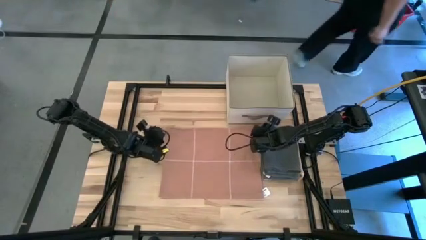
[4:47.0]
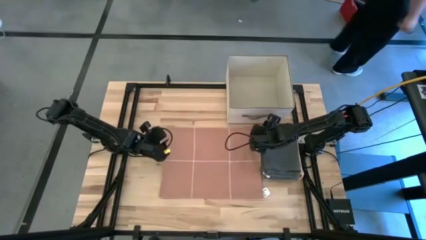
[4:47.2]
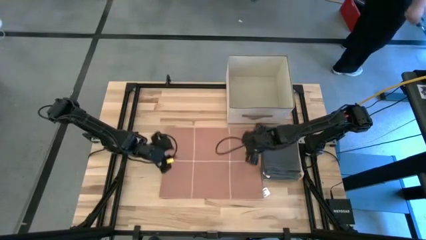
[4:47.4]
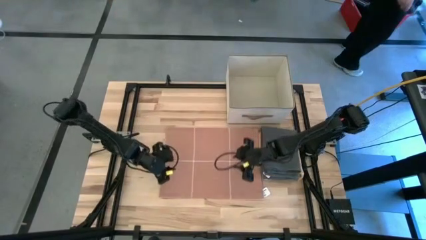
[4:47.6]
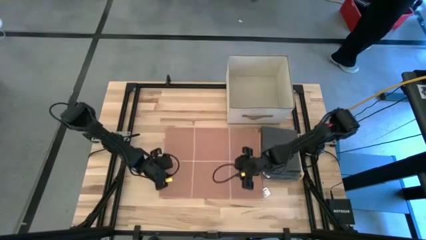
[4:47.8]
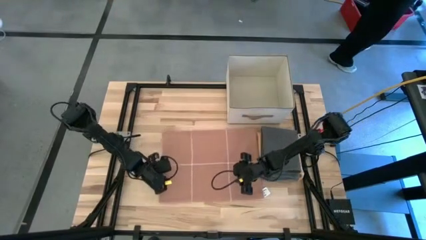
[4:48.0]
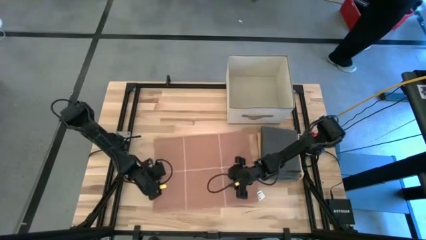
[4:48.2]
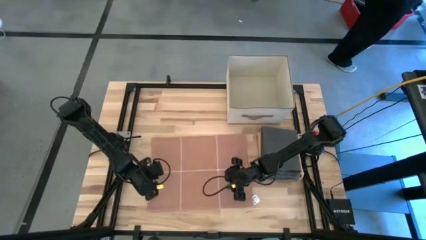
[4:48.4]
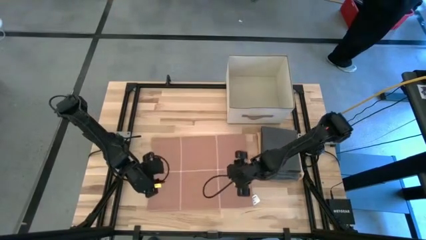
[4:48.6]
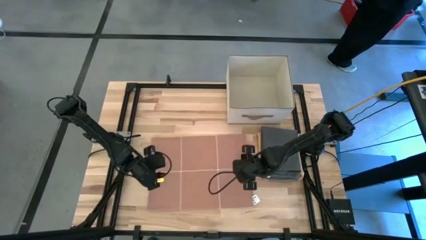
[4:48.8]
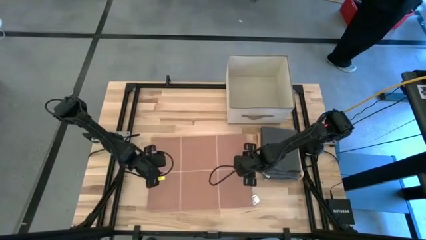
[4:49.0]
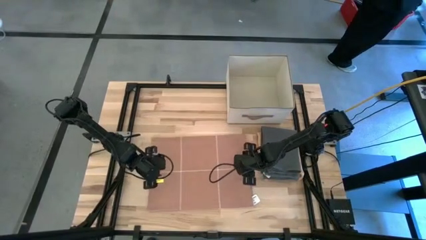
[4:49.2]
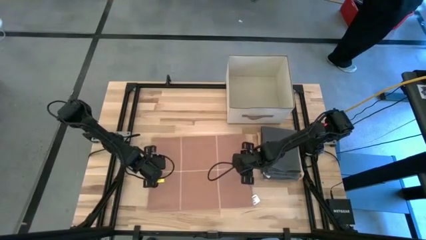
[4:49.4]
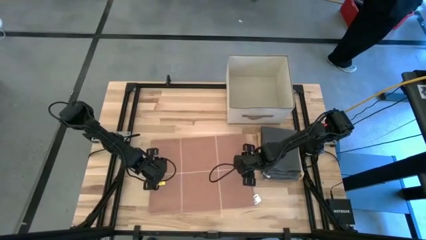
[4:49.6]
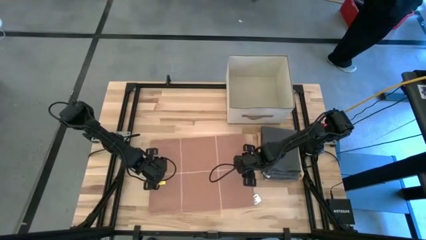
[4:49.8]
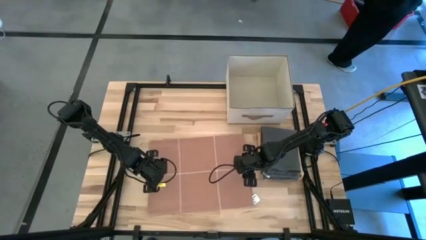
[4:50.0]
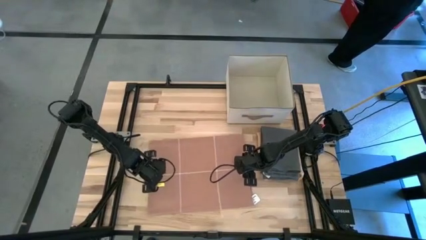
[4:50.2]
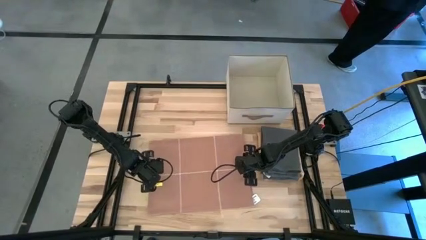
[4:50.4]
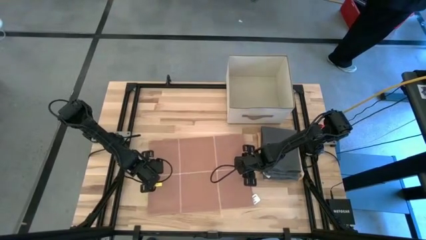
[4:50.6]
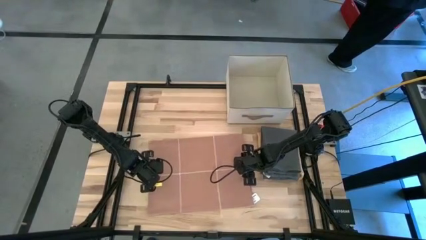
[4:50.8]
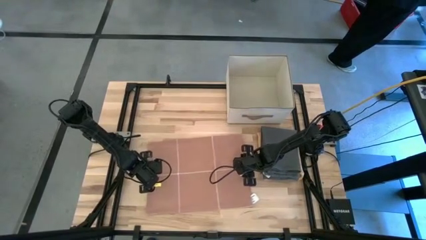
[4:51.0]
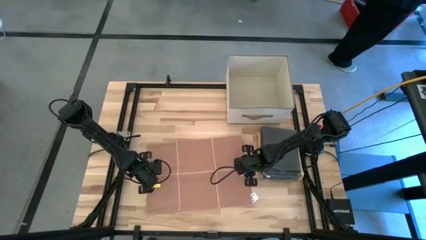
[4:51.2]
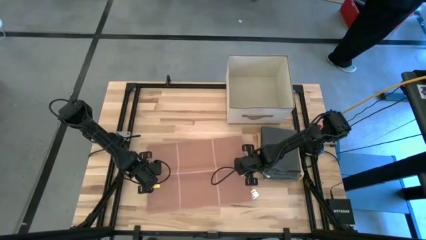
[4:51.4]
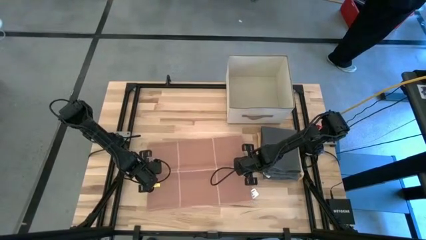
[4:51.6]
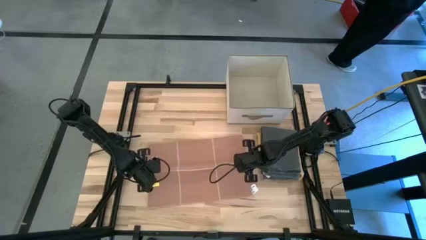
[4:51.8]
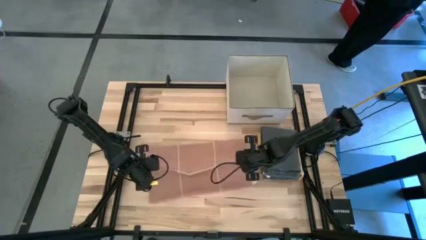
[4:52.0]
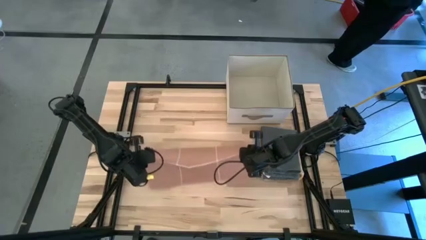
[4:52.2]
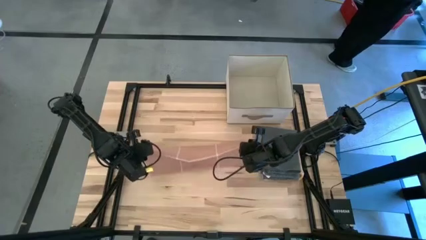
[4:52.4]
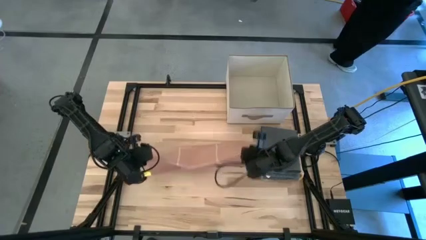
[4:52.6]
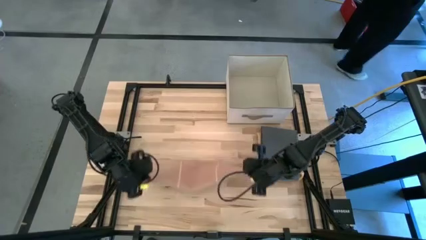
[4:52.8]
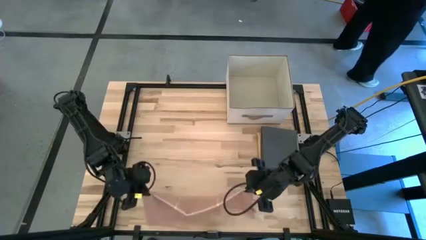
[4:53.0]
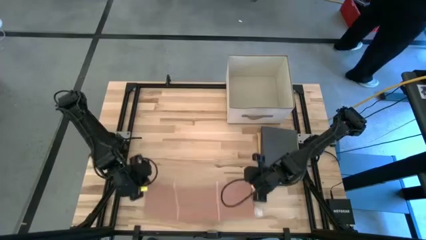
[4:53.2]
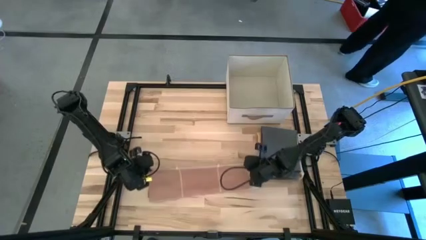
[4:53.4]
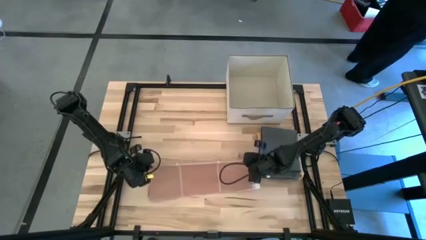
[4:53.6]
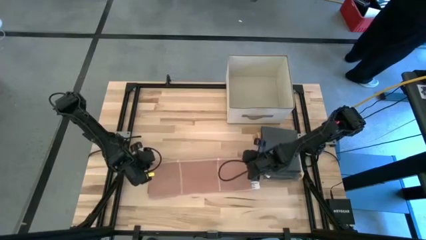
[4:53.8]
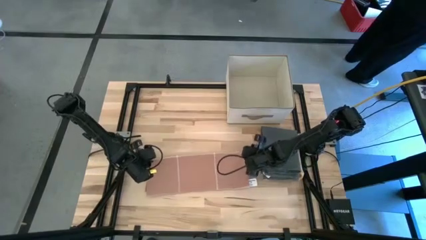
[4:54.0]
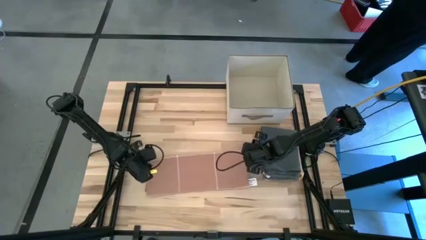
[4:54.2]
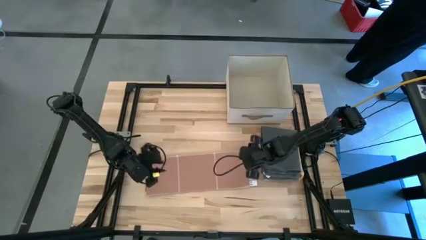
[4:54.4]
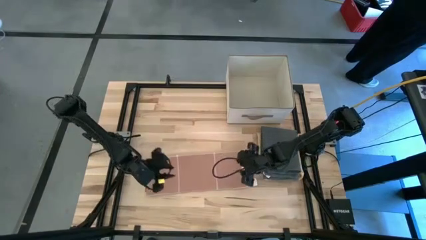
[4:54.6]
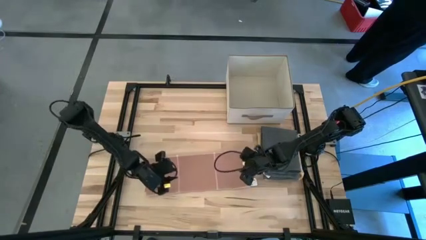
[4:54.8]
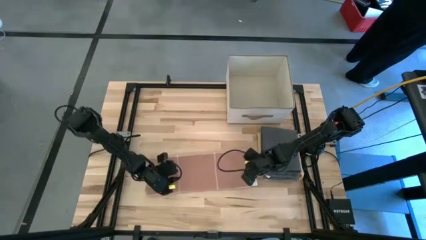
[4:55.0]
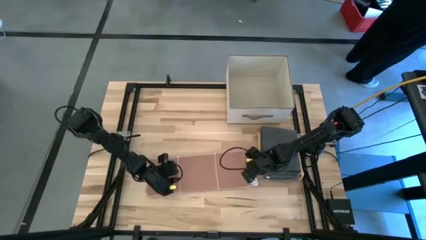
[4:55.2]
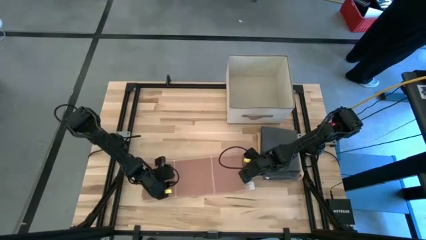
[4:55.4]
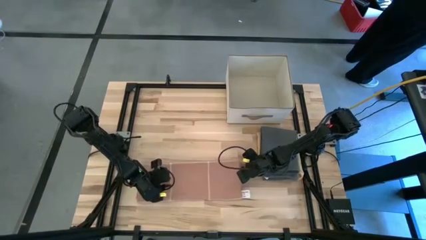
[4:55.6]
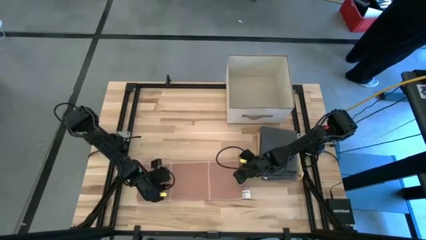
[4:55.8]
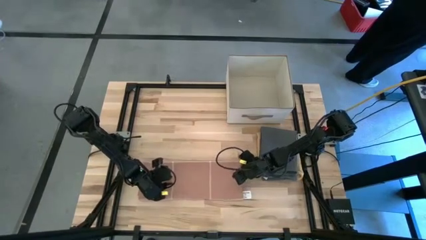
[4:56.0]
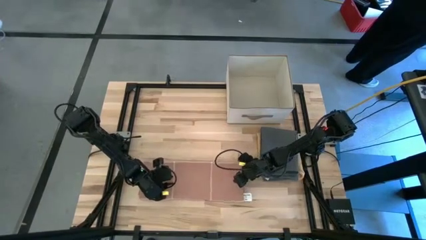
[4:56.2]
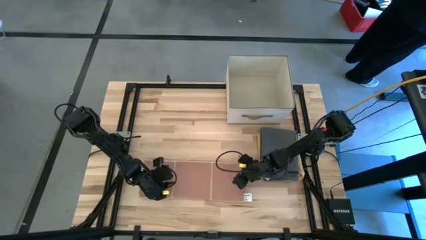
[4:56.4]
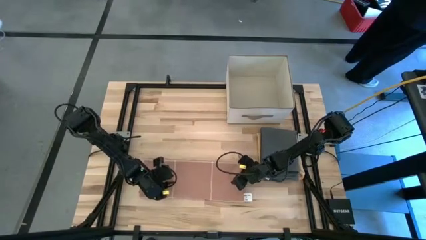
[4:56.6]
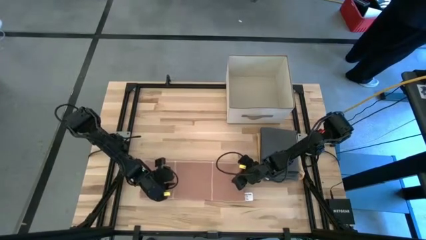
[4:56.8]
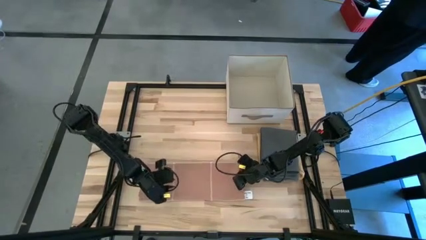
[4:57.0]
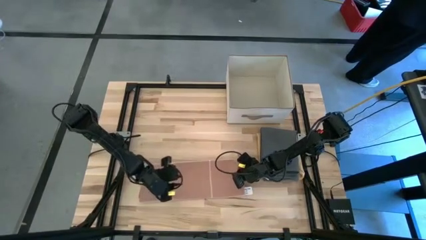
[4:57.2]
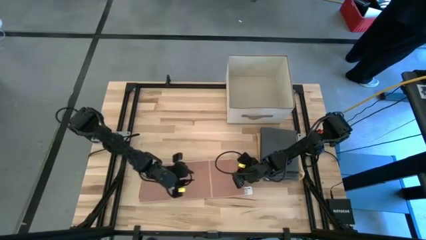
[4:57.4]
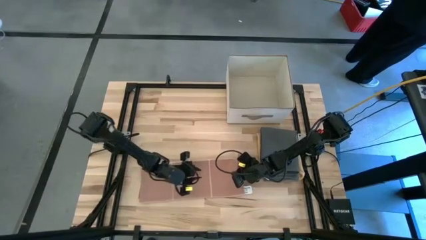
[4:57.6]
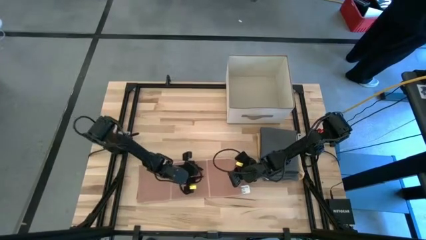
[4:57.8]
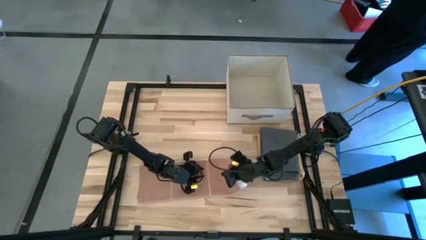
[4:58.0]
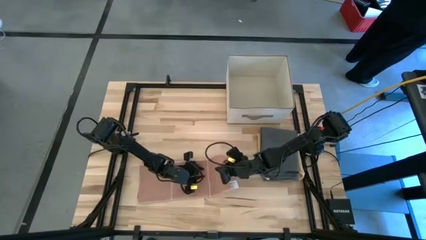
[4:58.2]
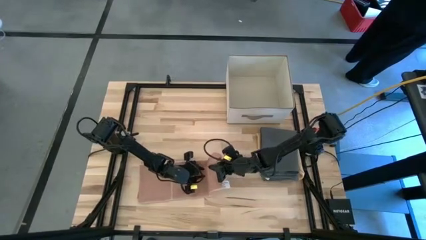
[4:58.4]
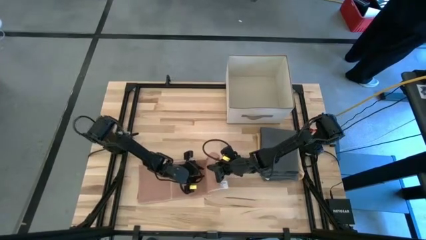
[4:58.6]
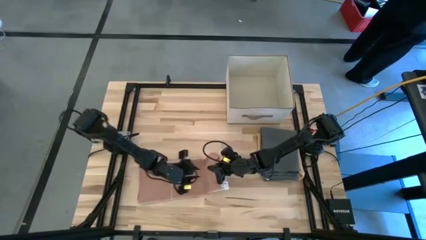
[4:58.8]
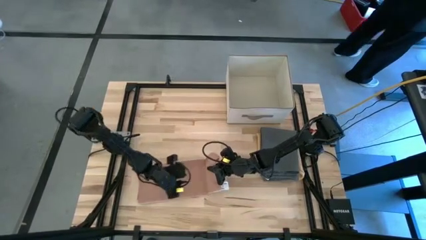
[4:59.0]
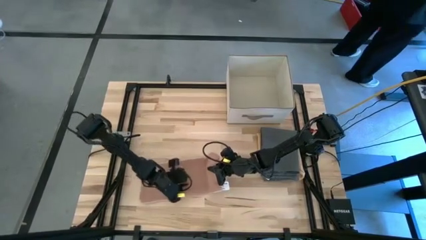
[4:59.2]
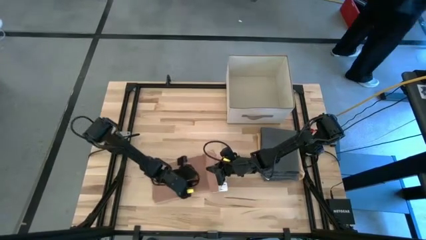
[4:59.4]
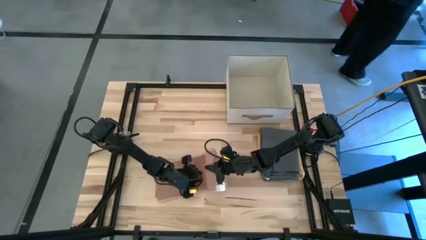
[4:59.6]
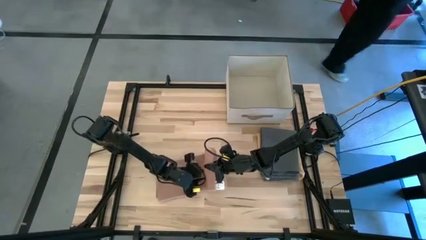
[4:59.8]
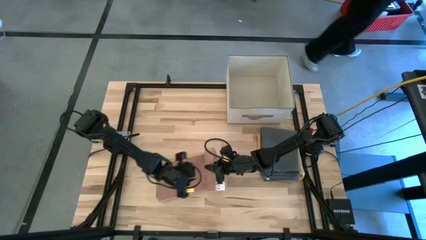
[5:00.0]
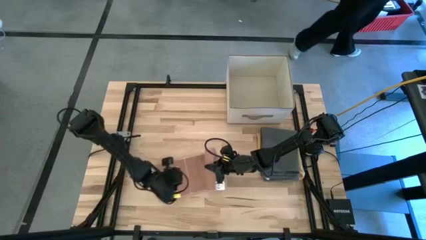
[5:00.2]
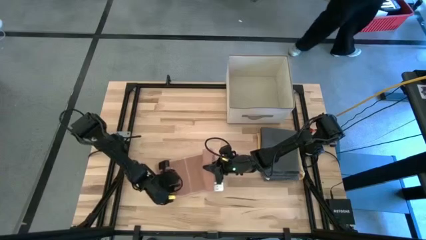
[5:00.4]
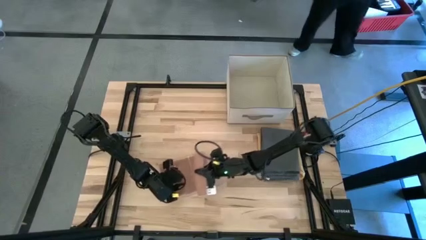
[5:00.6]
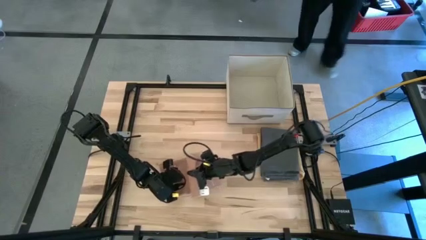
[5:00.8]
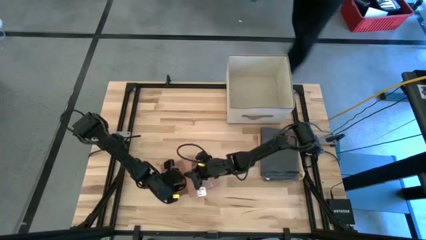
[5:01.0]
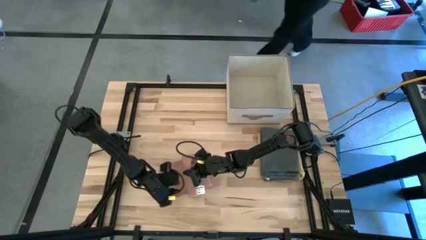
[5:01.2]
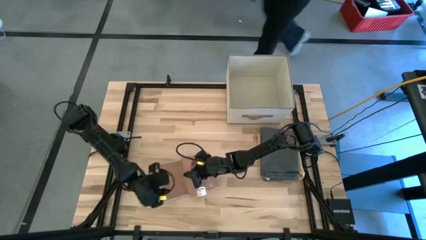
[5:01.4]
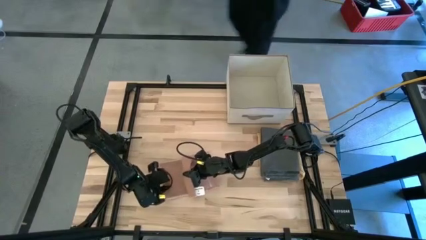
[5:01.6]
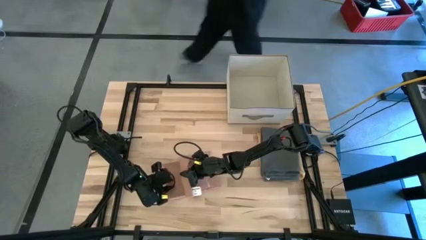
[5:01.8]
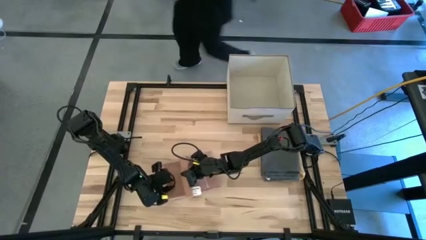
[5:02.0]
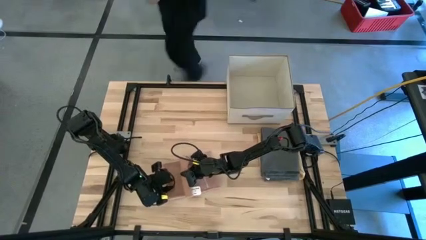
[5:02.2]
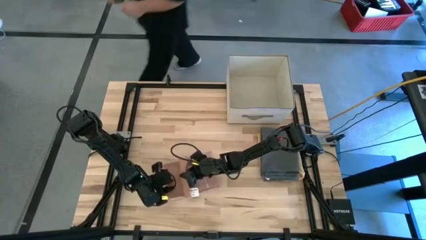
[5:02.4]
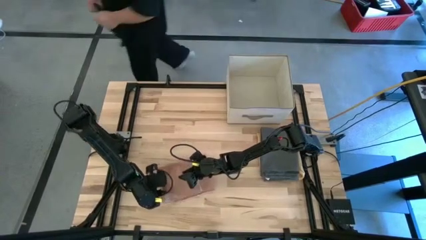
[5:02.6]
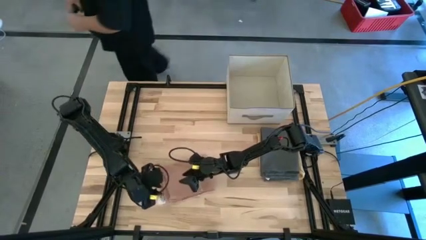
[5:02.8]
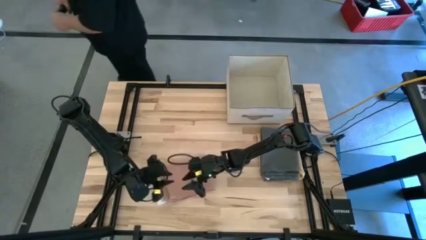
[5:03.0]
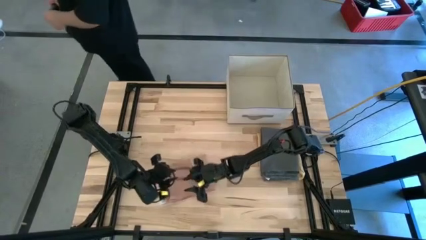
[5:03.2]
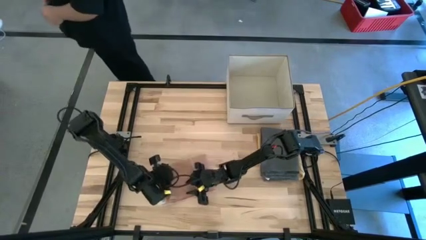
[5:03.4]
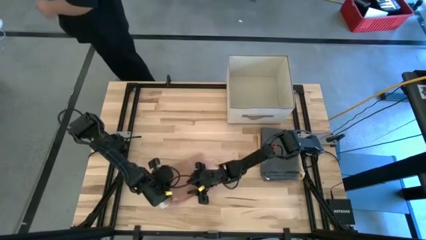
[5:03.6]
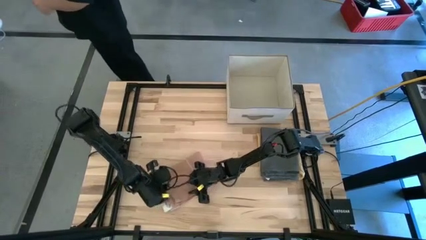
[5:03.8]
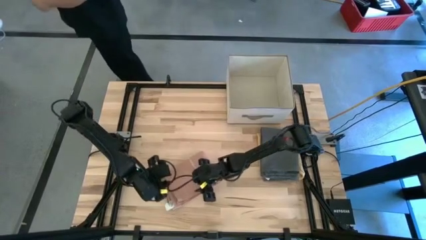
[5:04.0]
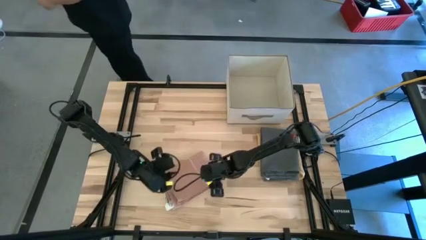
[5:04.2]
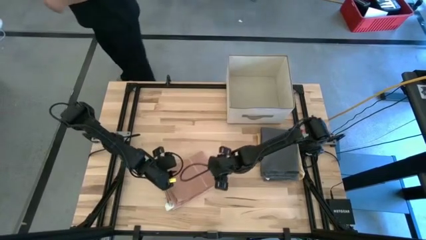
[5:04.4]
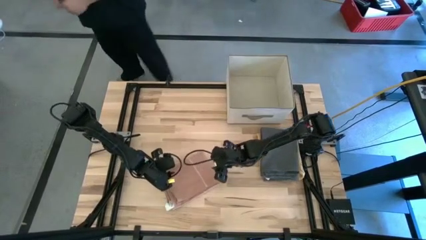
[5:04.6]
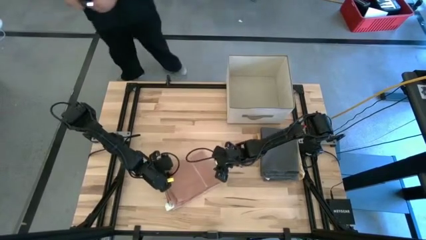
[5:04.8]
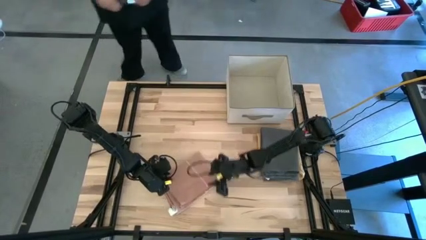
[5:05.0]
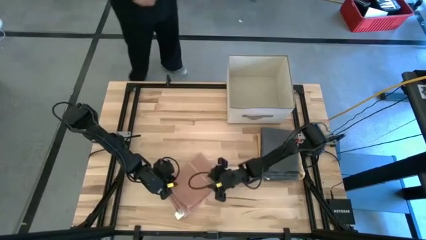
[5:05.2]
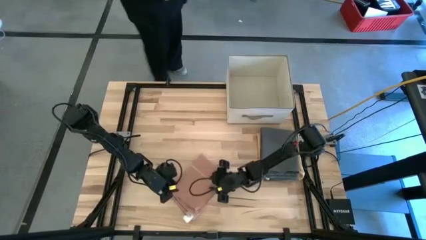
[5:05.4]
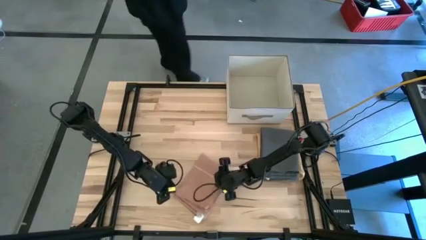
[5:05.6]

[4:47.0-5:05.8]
Task: Fold towel
Fold the brown towel
